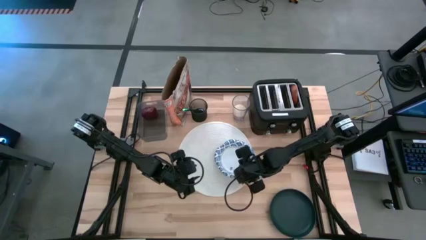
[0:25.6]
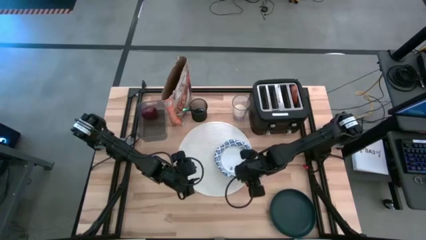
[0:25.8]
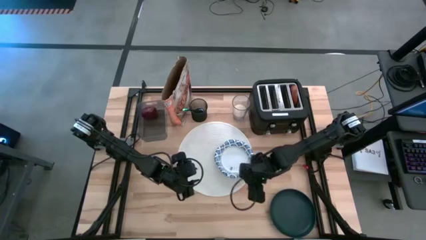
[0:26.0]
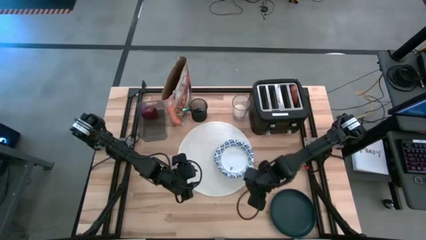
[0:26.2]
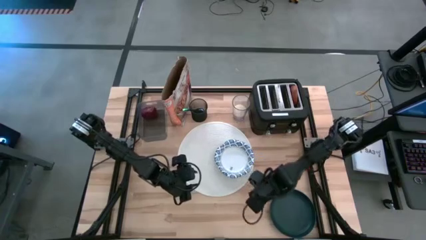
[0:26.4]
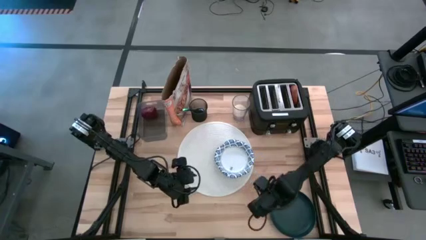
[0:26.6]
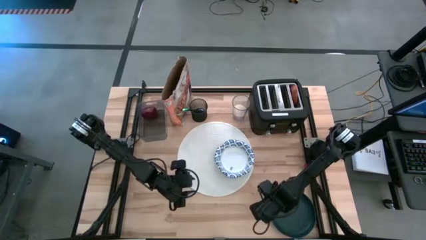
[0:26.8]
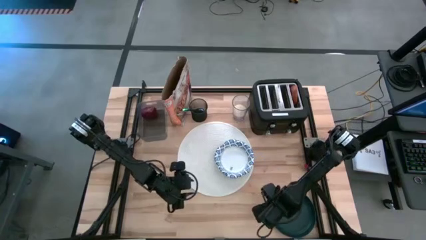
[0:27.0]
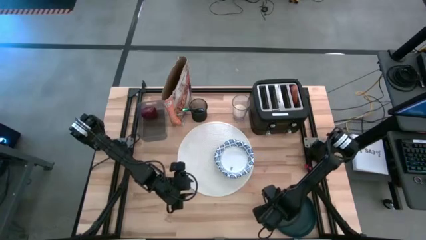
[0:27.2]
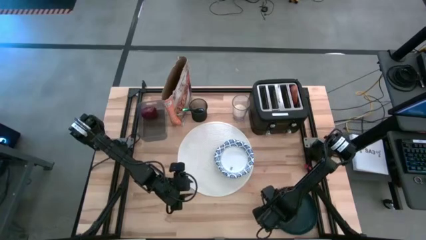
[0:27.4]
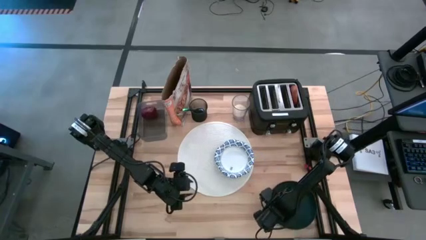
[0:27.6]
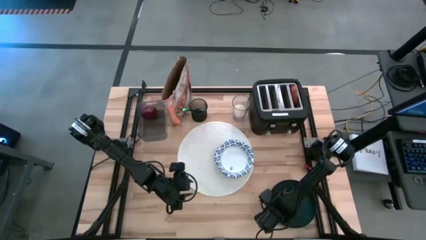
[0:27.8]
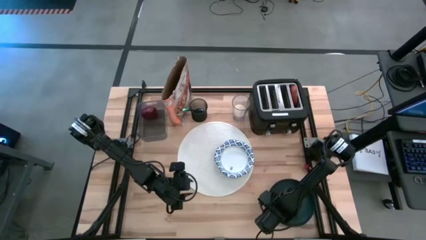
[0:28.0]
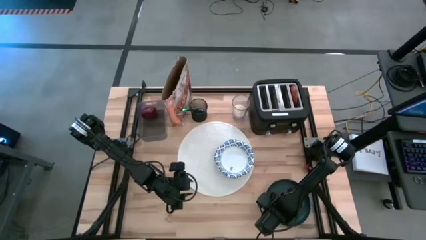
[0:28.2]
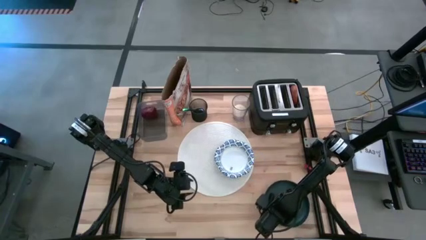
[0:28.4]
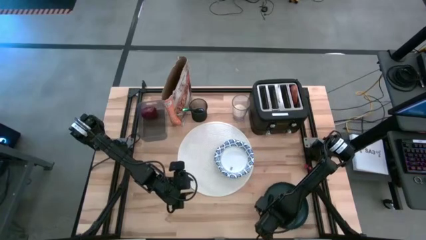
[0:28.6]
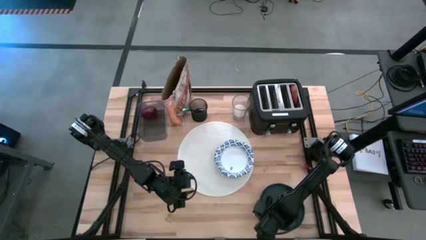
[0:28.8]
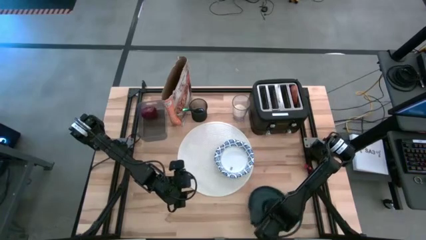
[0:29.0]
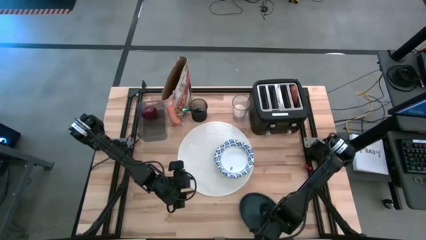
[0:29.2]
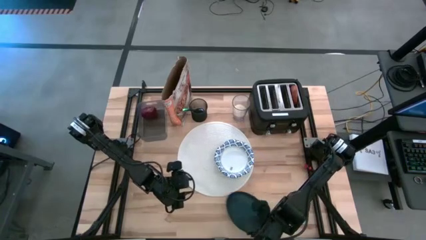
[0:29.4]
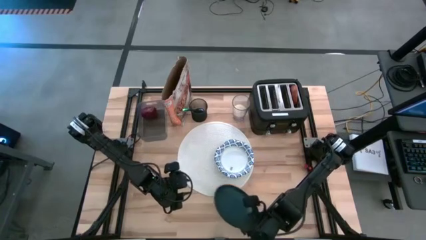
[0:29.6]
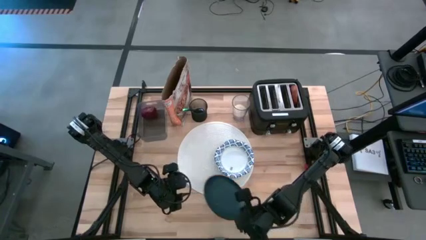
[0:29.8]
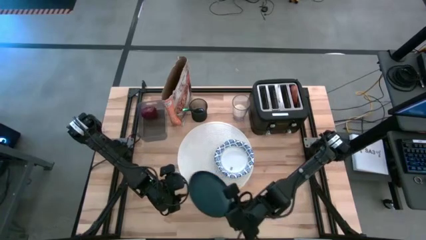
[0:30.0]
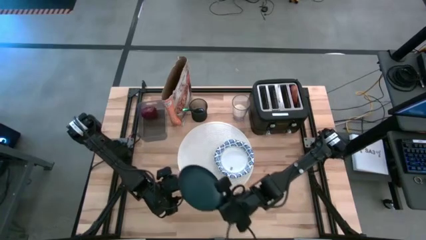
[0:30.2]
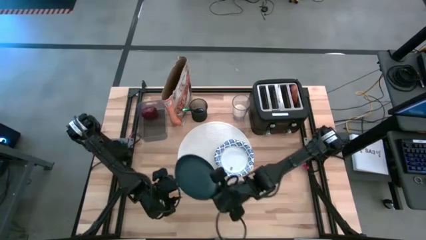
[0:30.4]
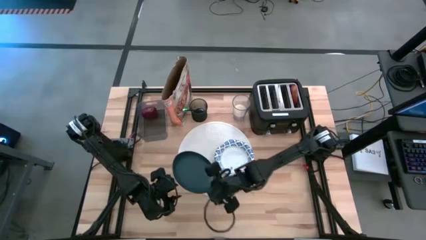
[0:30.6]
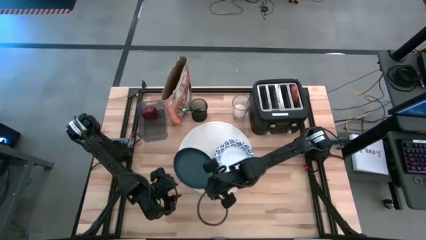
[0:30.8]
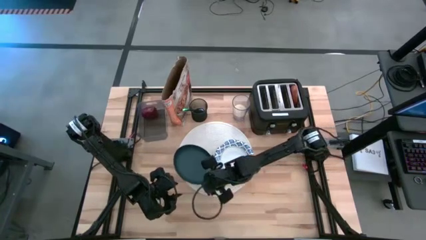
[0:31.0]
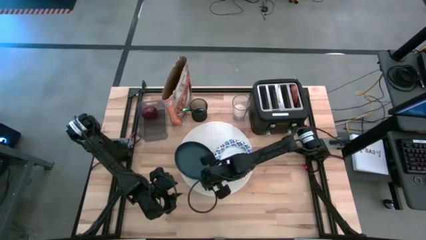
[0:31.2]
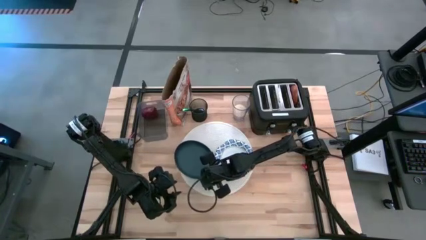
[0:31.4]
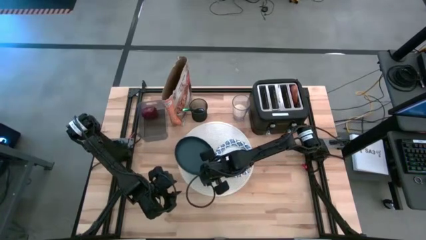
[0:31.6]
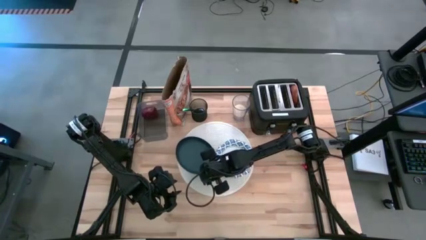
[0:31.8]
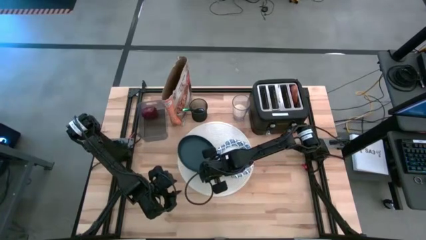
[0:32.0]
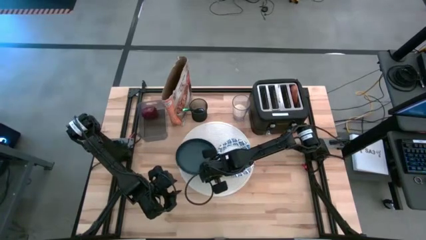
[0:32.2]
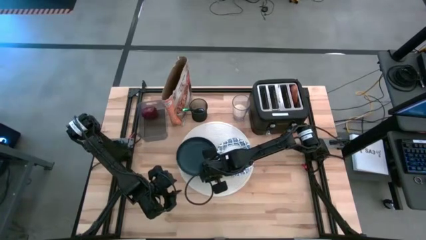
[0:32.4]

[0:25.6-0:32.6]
Task: Arrange a breakfast setting
Put the dark blue plate to the right of the white patterned bowl on the white placemat

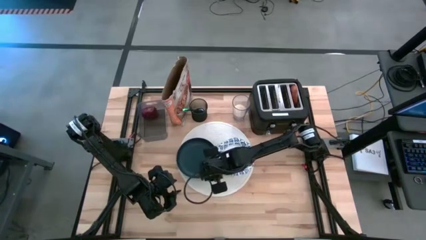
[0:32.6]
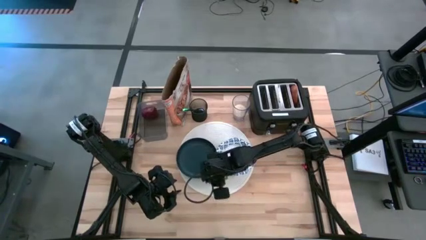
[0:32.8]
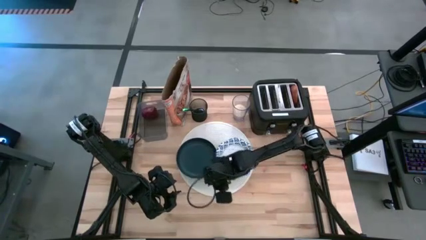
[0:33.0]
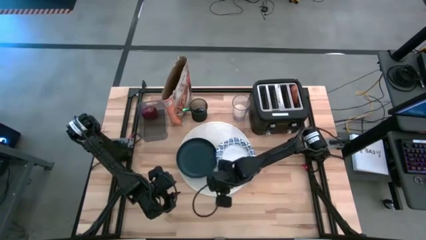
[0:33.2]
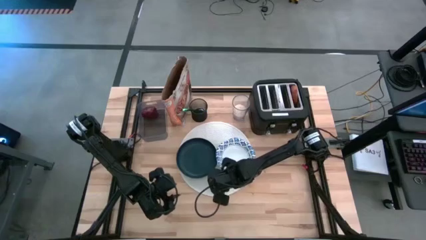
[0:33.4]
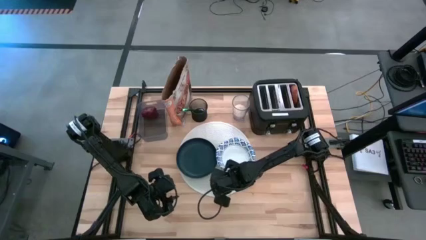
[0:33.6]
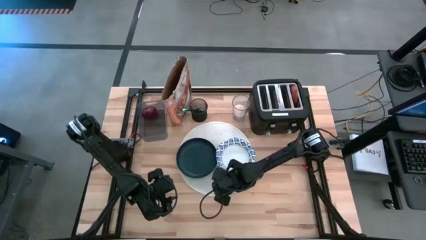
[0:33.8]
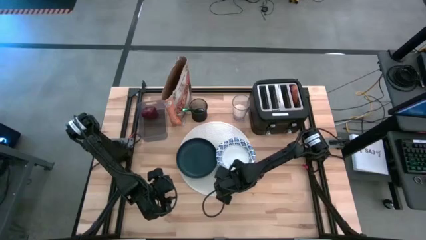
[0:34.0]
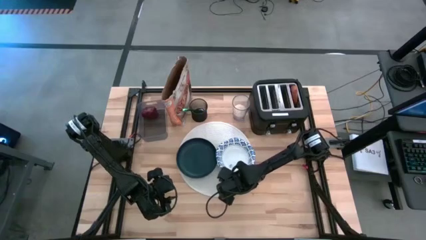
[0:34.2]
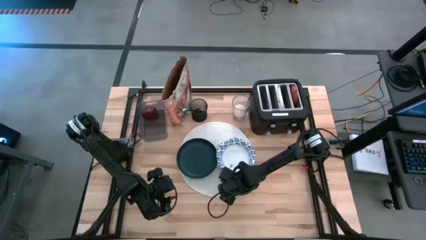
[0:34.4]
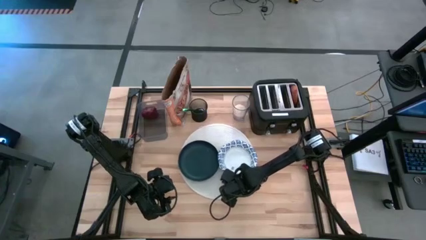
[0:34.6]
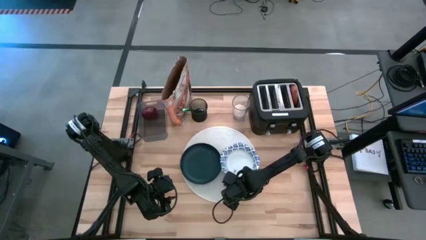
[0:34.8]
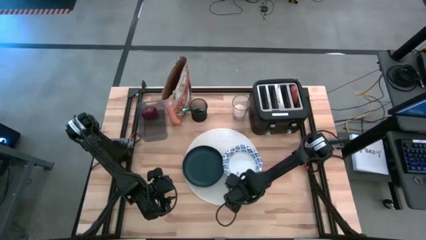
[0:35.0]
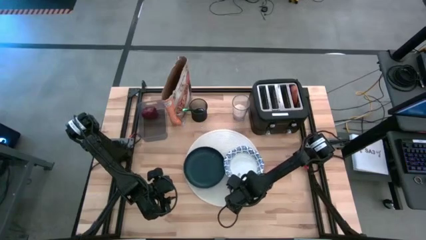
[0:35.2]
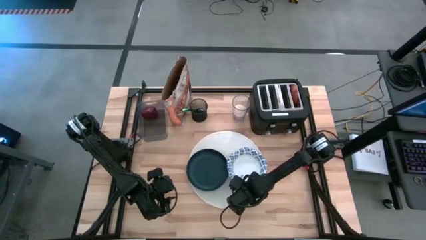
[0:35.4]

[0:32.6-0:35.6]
Adjust the white placemat

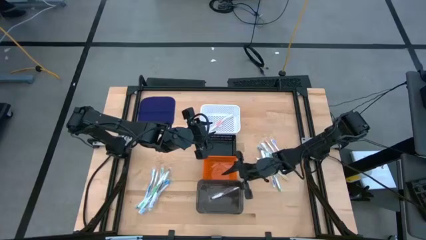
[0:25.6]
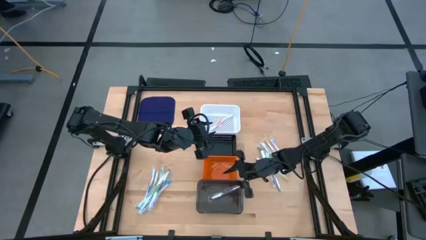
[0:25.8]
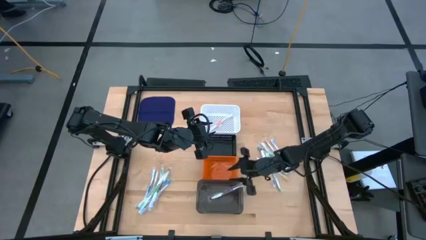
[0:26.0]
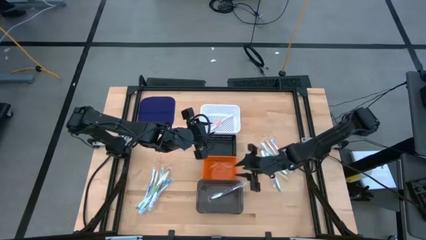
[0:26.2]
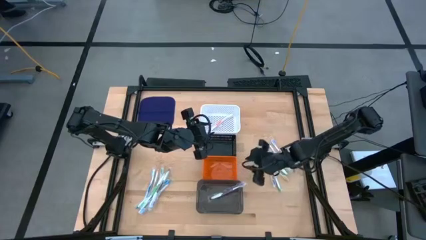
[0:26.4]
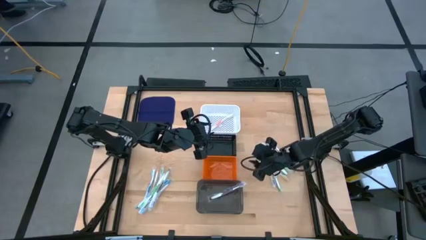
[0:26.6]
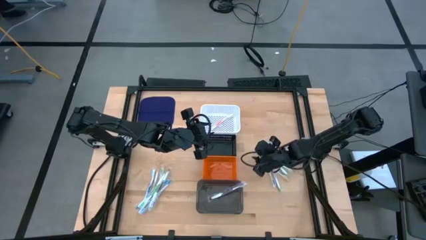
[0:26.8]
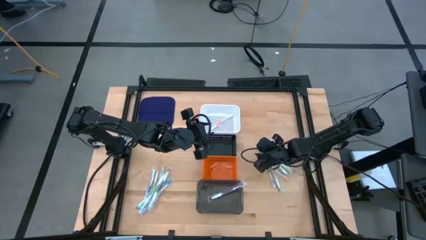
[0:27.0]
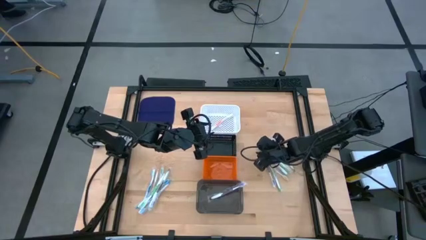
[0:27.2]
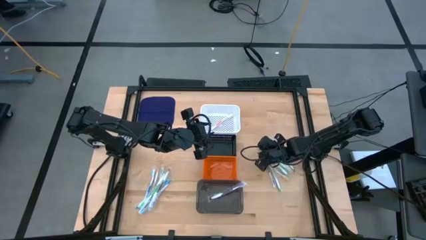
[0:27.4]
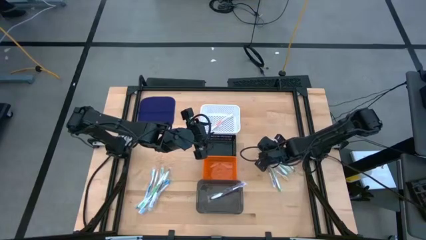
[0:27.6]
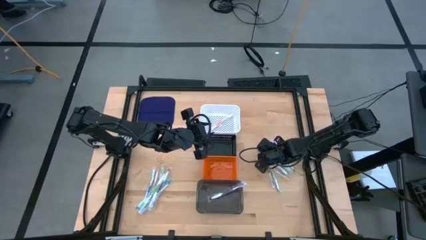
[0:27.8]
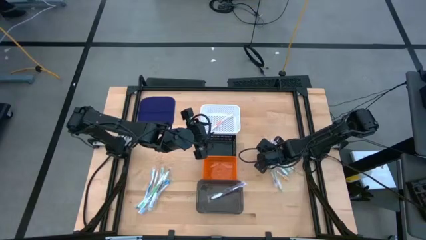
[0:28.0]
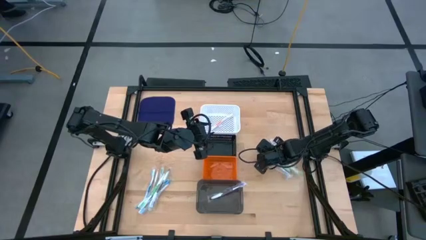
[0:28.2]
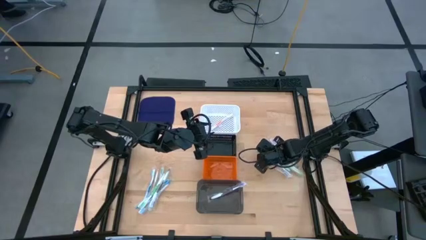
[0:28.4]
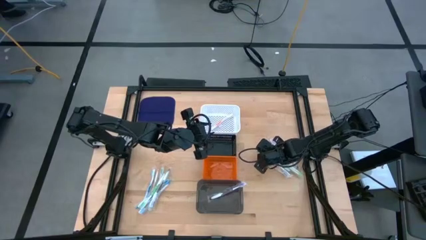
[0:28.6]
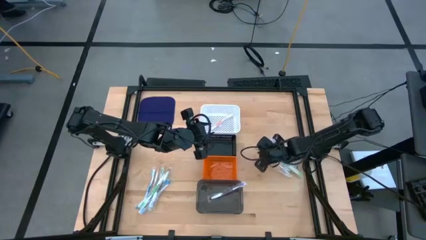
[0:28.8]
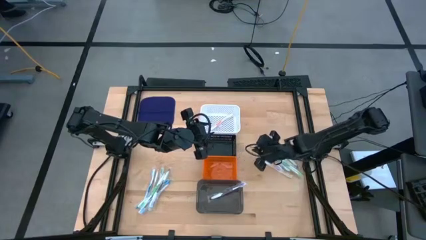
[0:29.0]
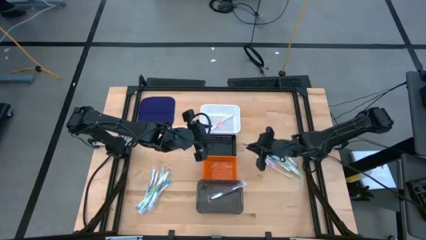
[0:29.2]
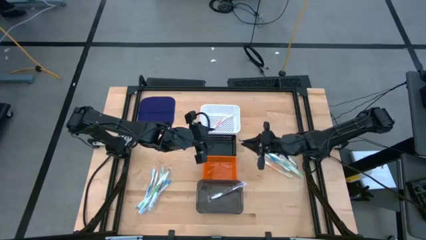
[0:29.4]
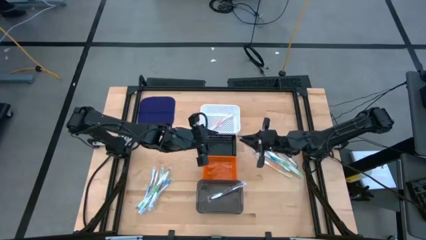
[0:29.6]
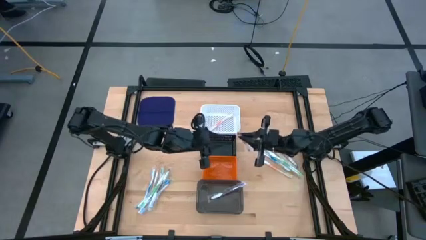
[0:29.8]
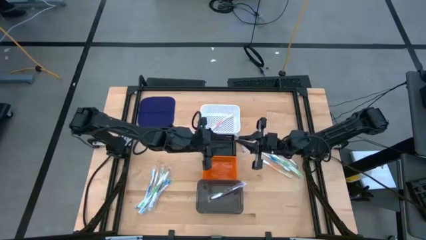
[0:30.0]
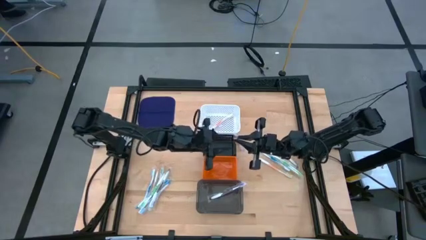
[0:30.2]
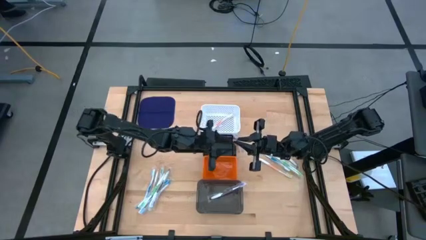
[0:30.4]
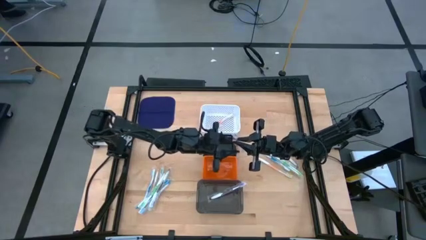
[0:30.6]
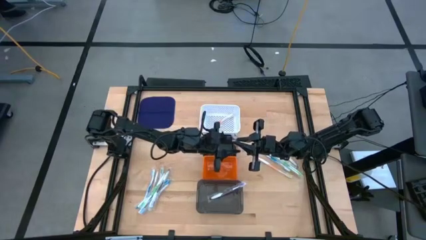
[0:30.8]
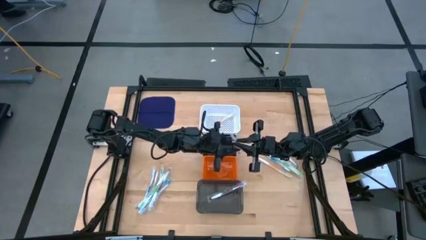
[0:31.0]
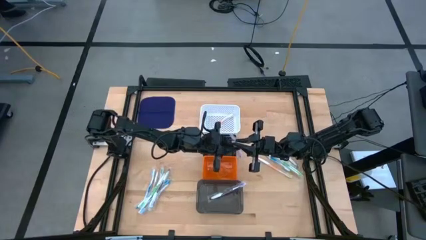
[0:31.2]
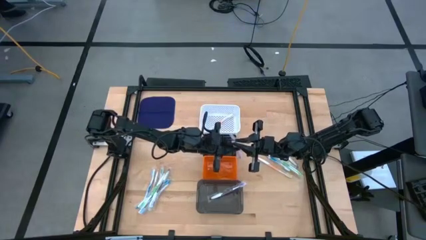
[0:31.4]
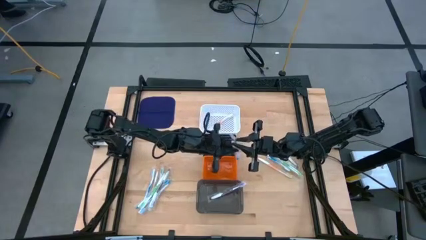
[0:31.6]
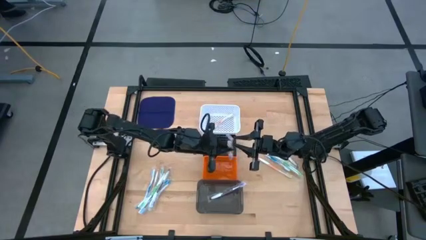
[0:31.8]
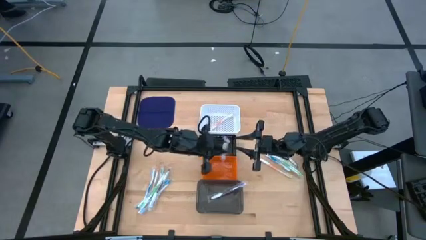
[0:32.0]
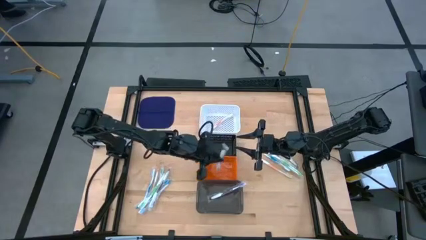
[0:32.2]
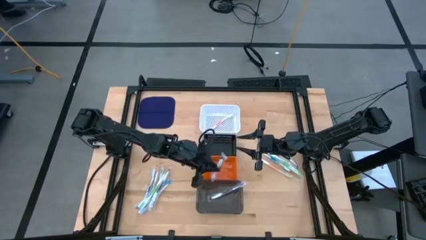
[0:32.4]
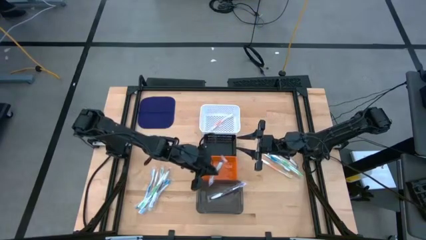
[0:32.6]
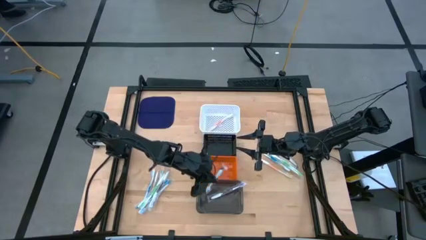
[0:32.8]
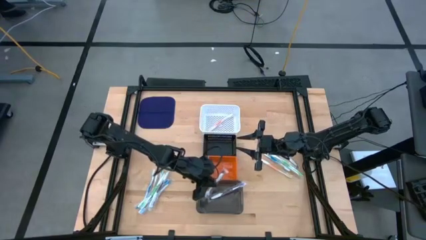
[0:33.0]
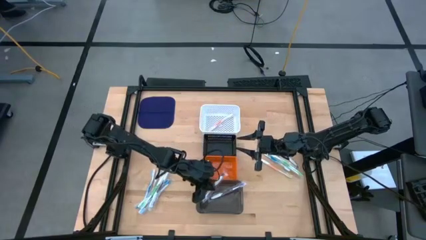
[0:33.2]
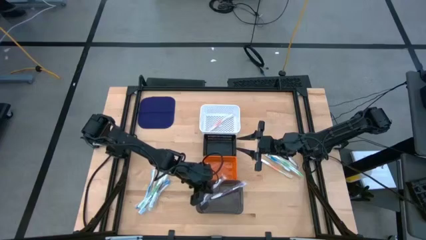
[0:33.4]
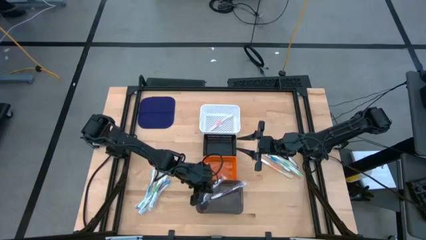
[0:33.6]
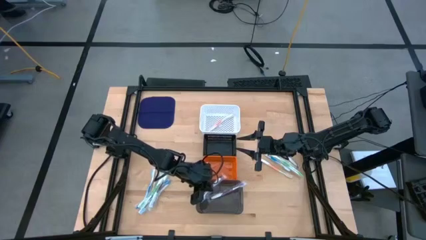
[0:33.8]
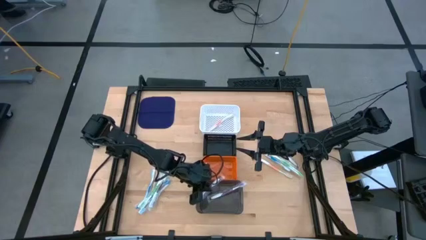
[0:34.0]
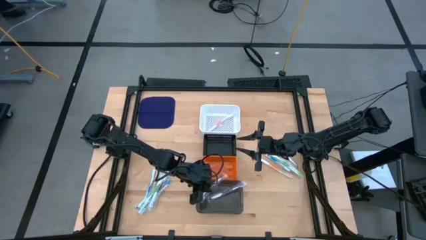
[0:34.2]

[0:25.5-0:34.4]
Task: Pick & Place Toothbrushes
Put the purple toothbrush into the black bin
